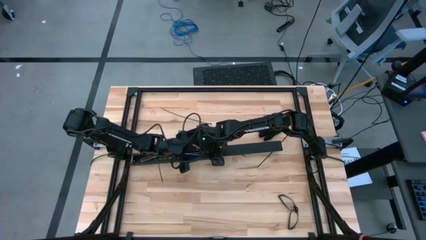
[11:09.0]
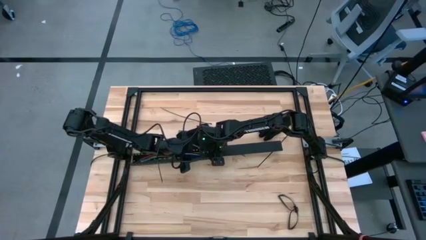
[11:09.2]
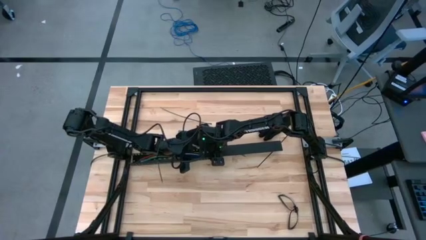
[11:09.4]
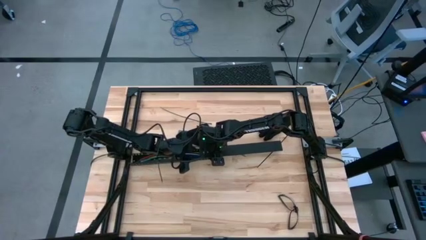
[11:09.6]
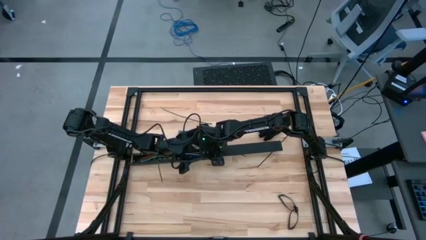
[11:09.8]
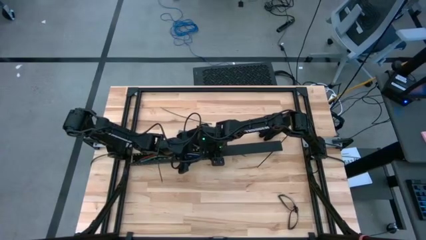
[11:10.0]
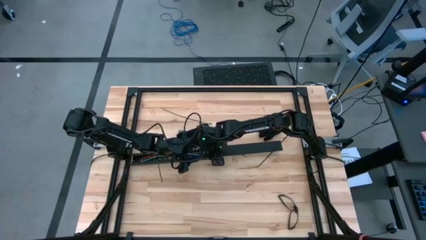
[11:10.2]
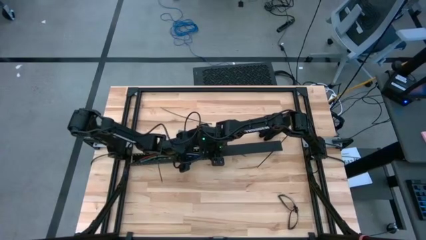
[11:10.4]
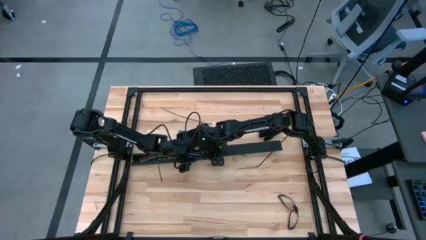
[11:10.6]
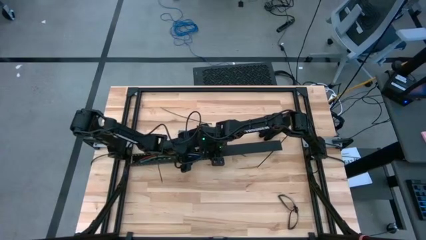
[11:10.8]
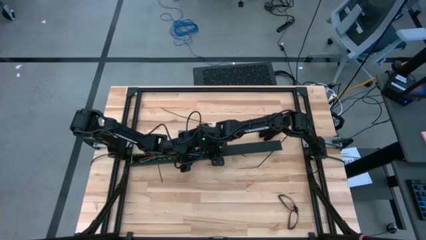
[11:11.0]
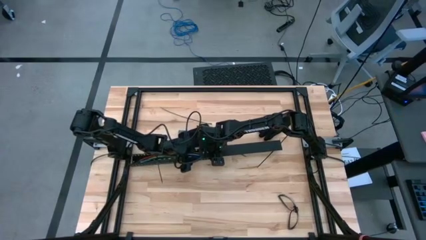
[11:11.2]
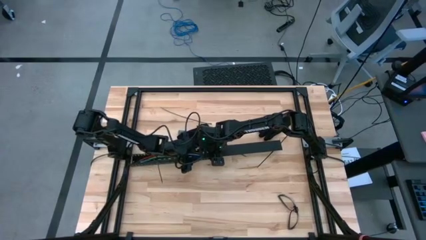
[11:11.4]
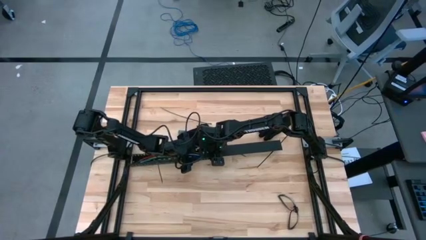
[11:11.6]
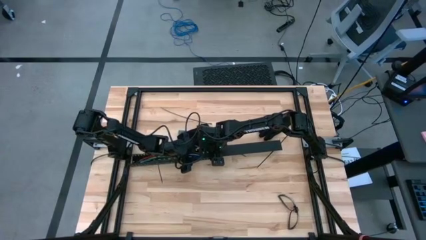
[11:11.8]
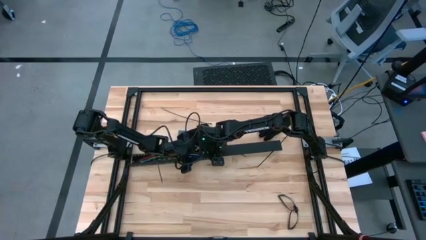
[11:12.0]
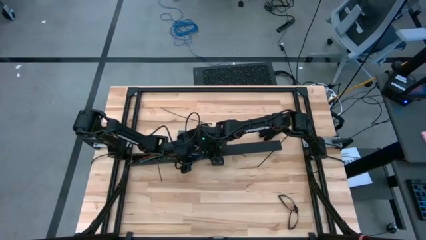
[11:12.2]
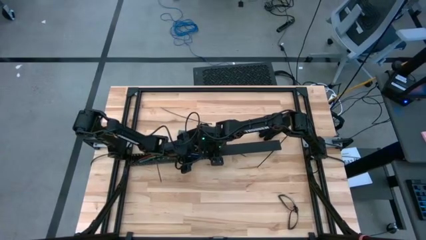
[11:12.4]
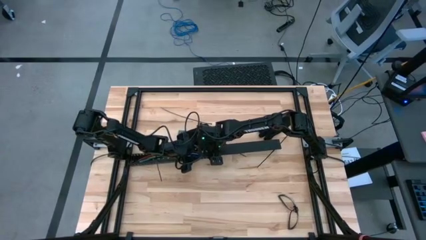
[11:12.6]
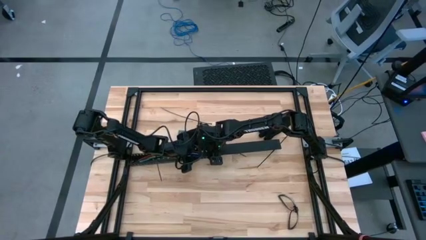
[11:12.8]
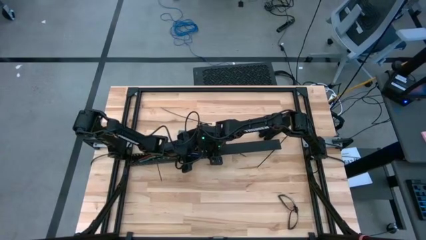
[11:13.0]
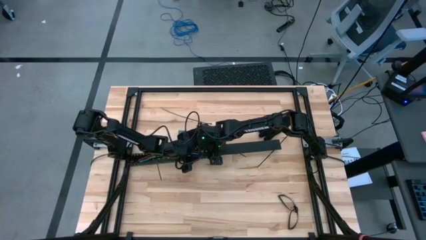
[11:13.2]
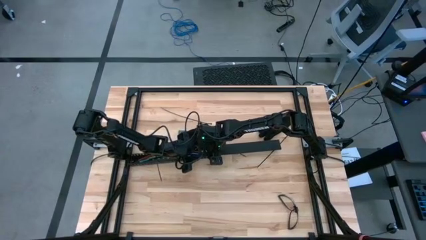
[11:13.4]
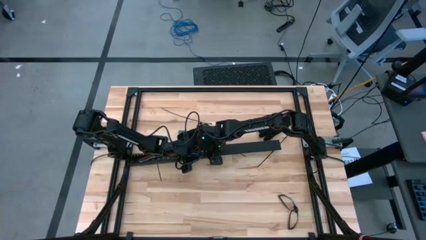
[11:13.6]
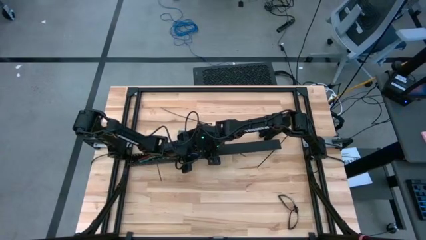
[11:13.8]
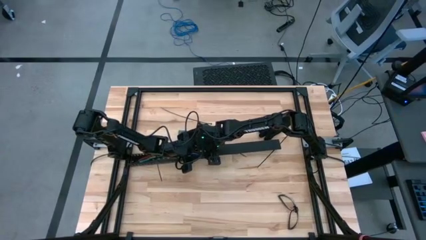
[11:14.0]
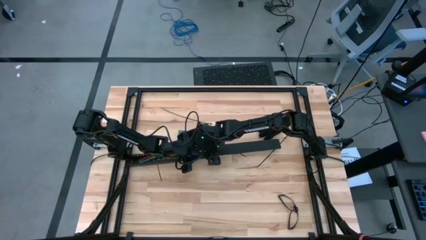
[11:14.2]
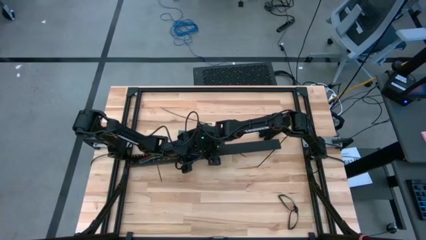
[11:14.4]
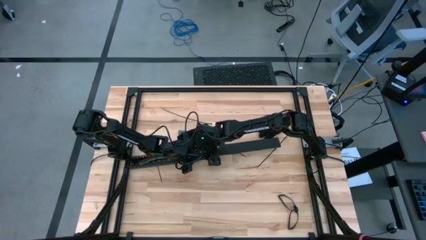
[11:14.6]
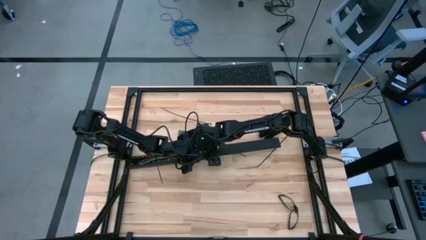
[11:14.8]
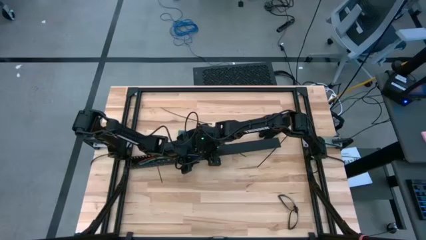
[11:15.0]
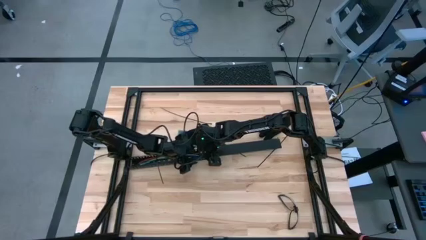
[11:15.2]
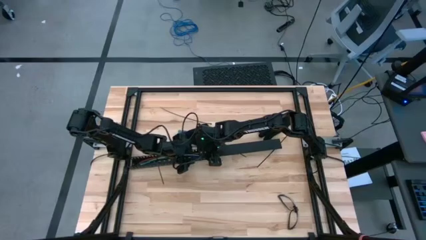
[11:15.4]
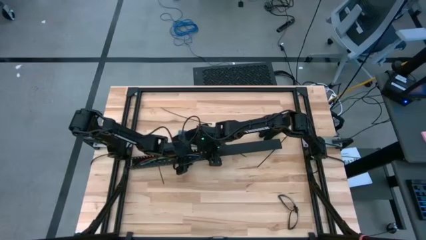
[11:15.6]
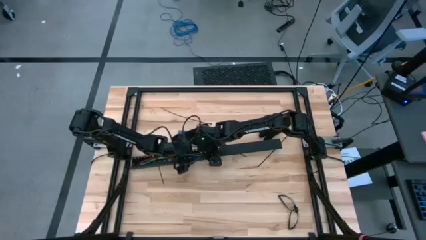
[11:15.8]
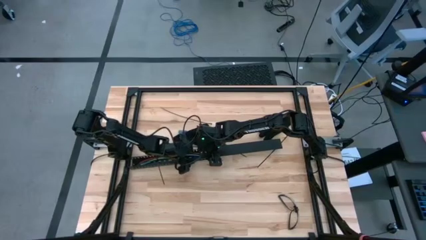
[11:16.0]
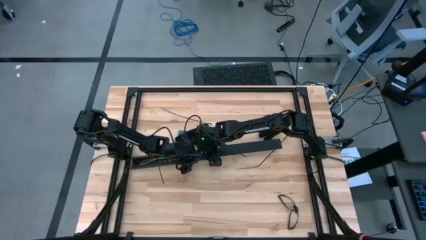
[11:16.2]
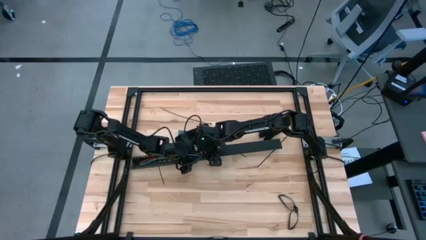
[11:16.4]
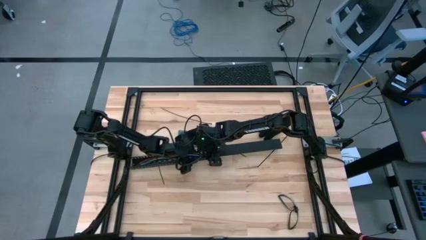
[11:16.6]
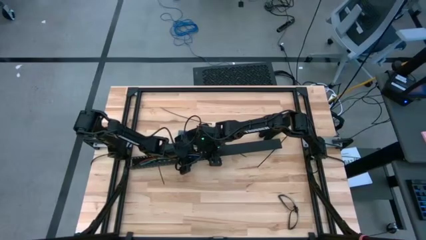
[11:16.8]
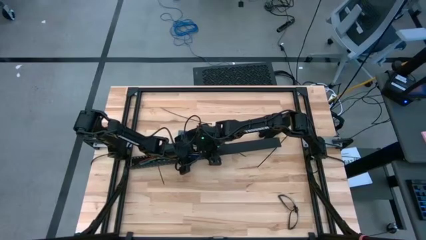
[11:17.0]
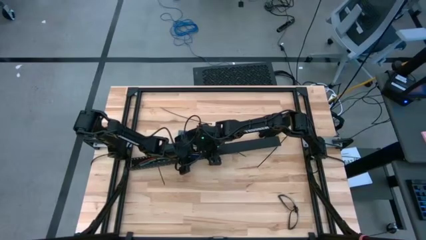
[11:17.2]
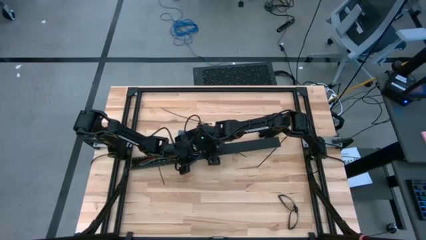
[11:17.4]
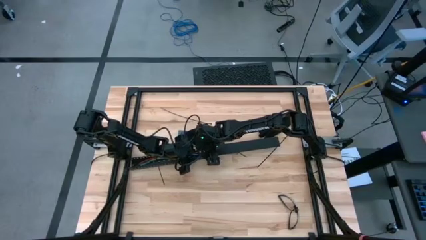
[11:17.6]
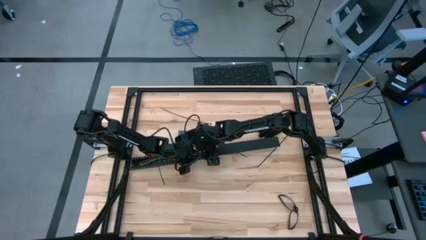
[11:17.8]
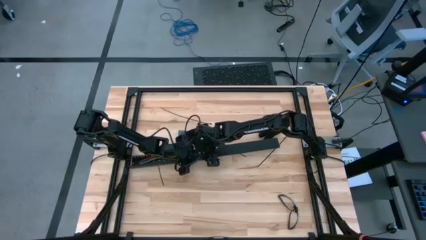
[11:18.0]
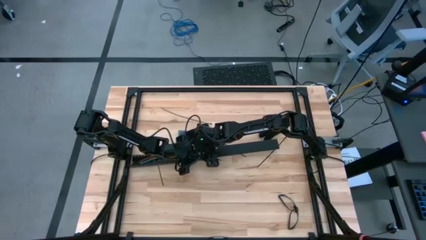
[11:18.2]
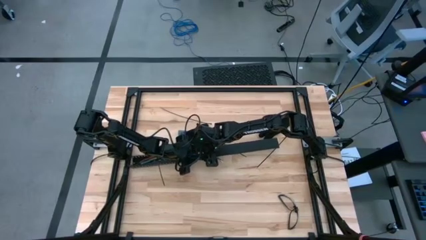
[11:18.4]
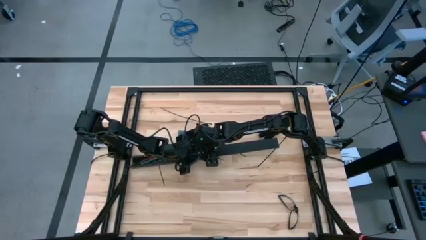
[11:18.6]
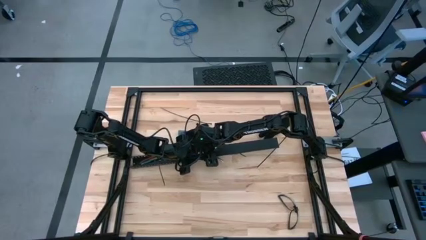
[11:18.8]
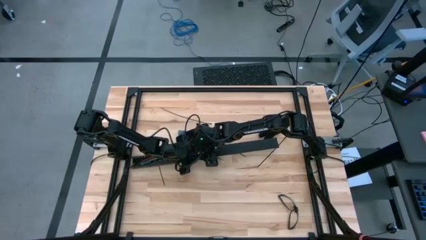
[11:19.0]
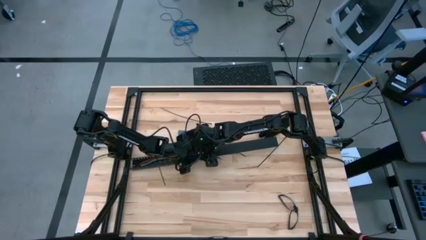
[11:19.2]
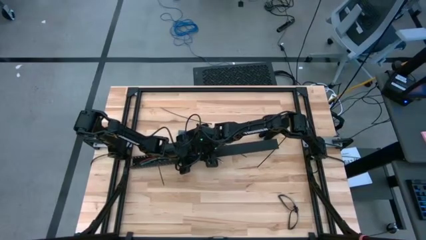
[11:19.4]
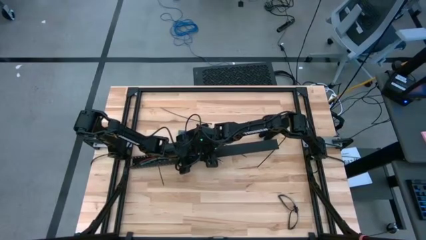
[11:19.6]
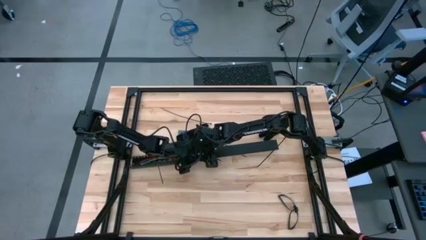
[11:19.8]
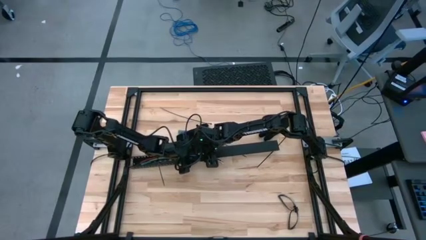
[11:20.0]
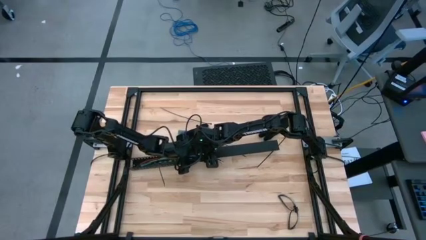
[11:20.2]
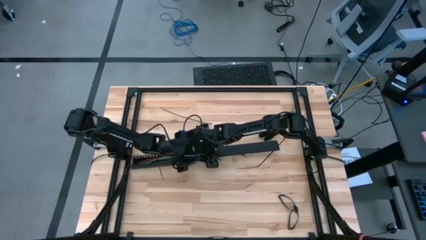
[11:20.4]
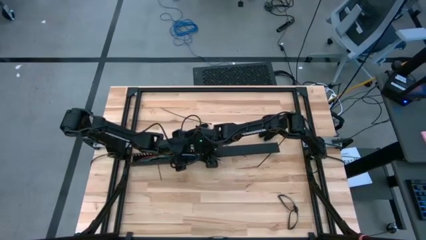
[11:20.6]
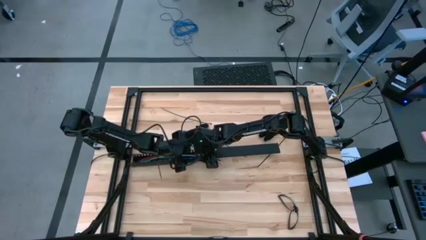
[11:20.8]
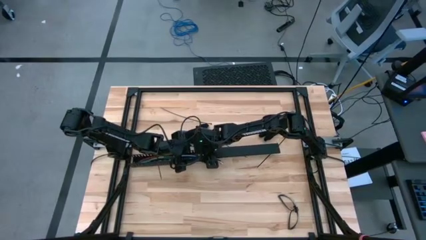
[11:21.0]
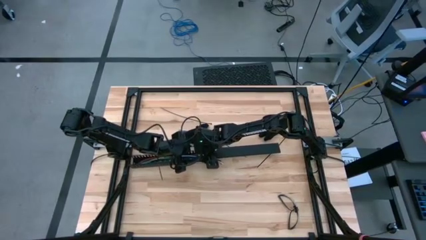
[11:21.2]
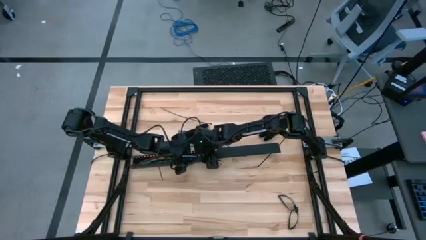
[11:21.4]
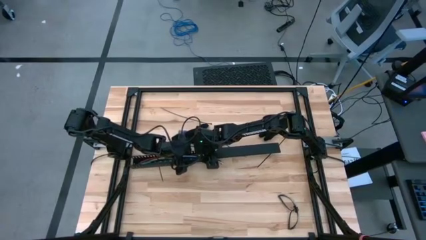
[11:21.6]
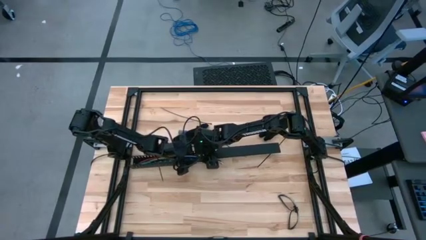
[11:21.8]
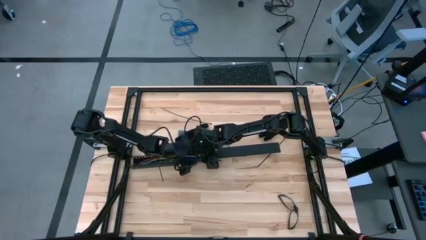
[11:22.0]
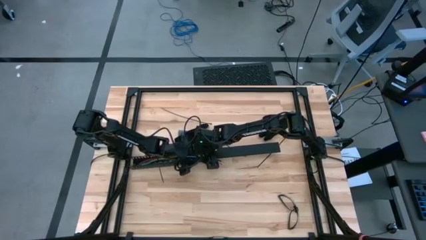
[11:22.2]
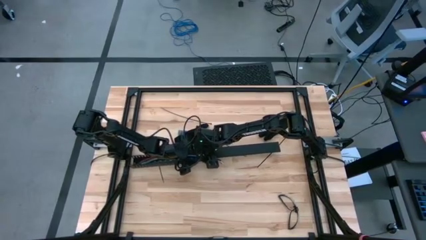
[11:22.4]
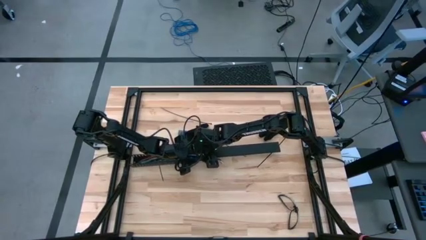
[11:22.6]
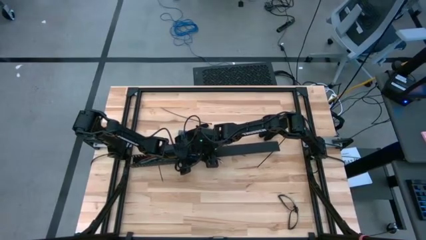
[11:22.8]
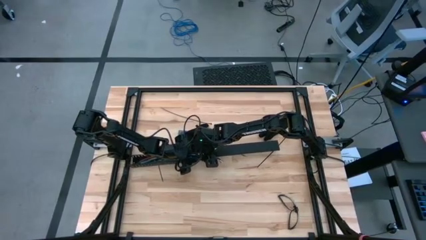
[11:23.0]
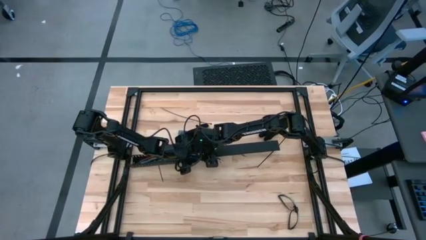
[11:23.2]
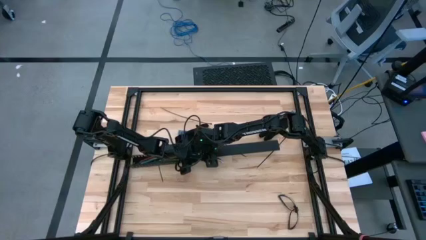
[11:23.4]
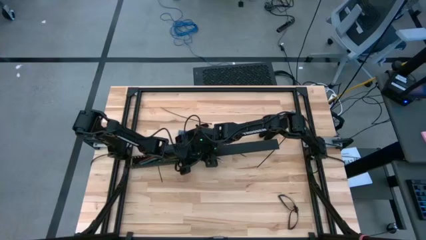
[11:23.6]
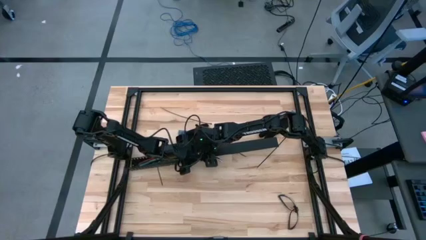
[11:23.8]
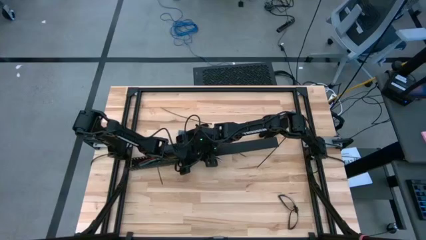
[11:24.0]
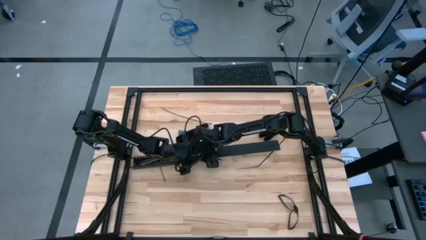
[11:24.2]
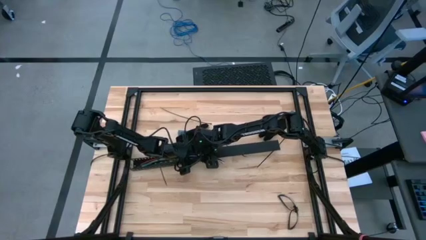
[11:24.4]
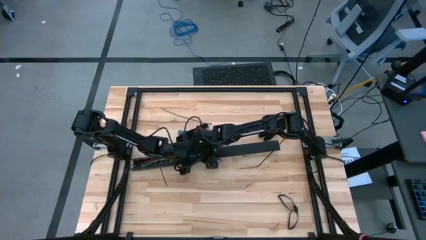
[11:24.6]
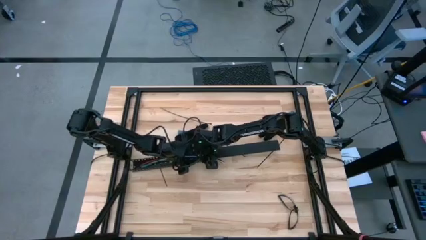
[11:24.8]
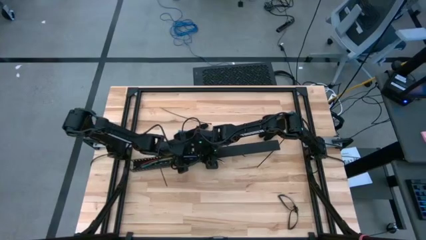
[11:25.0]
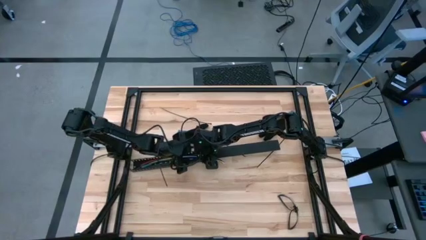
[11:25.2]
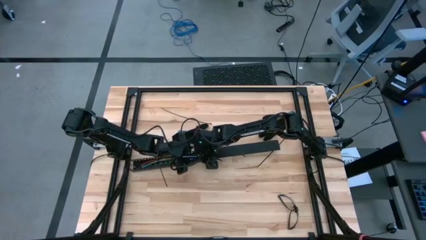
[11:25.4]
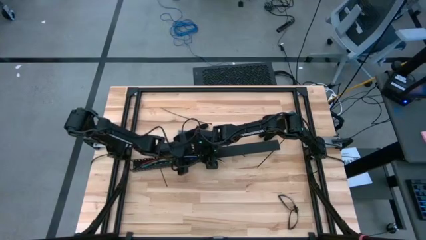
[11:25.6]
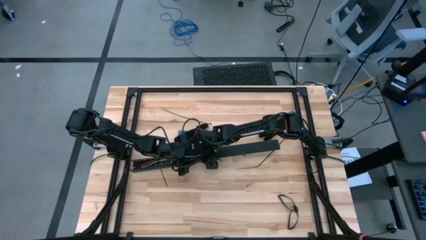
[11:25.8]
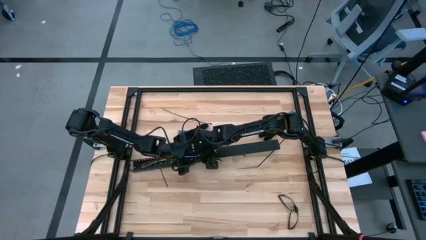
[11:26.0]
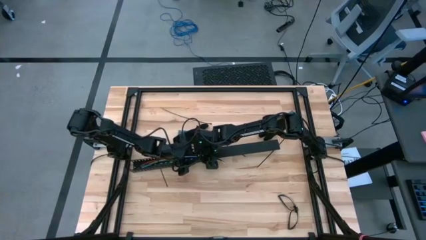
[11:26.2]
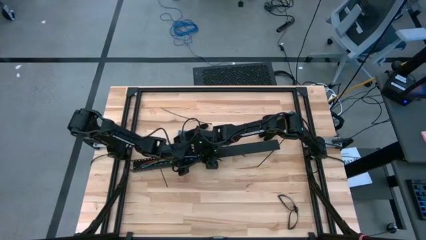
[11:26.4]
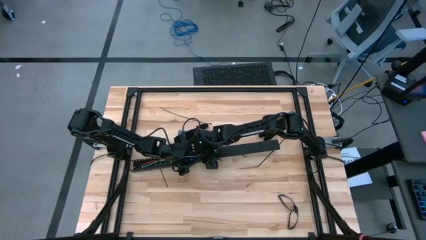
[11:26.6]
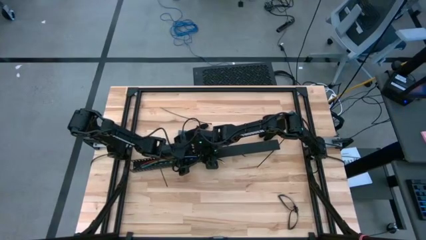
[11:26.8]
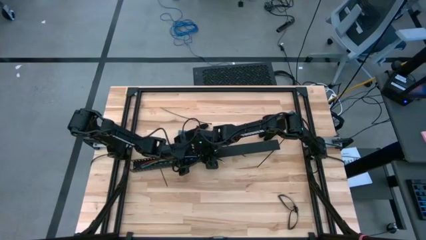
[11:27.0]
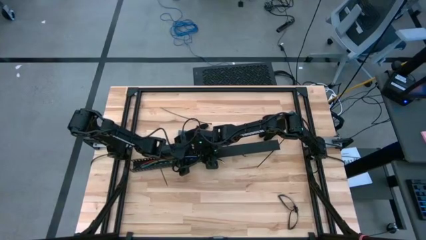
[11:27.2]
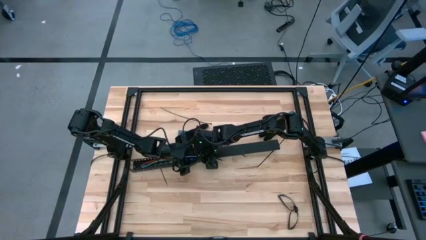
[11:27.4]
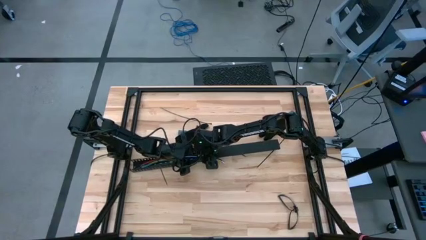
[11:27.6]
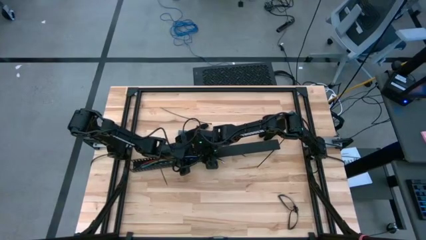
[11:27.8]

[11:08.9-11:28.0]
Task: Ziptie cables
Close the cable duct
